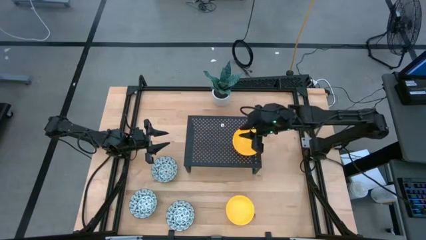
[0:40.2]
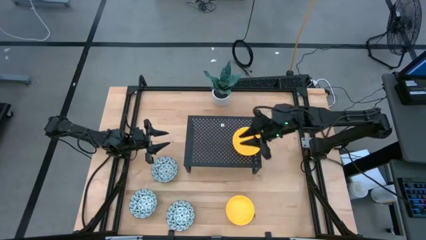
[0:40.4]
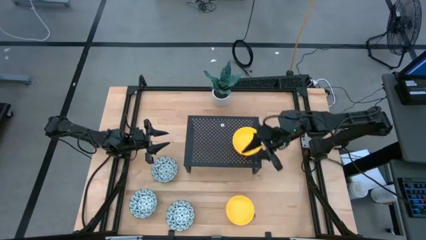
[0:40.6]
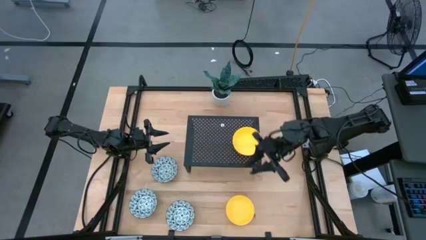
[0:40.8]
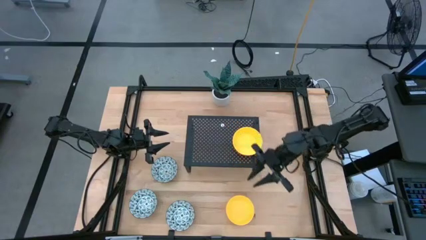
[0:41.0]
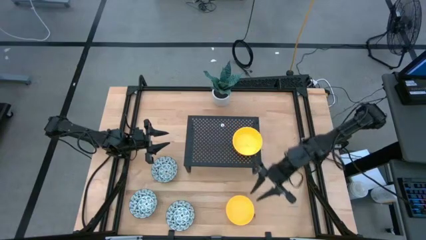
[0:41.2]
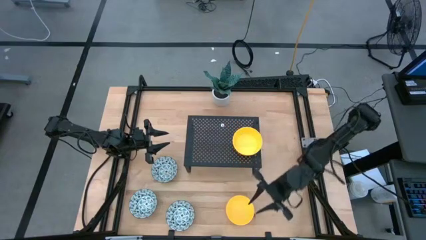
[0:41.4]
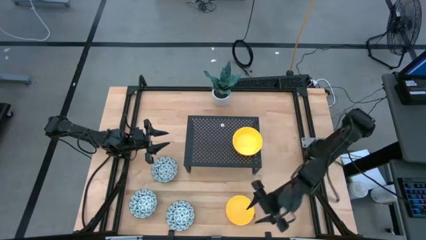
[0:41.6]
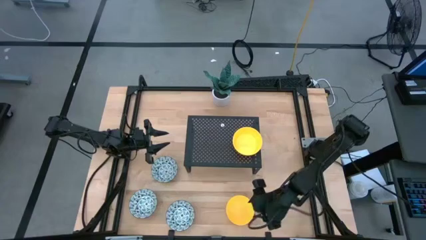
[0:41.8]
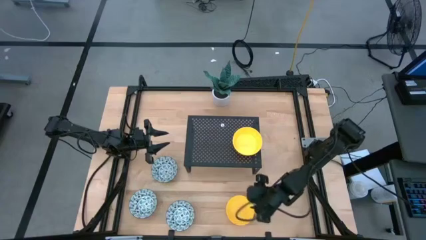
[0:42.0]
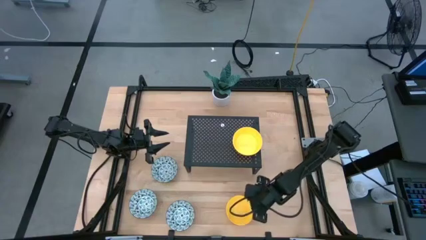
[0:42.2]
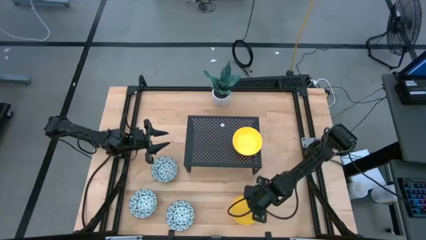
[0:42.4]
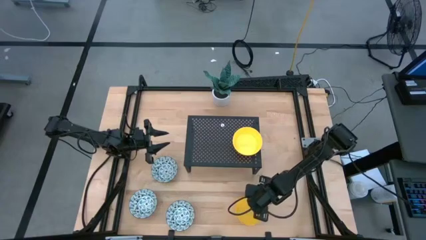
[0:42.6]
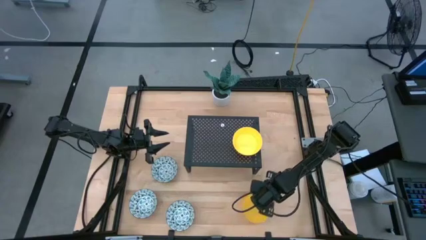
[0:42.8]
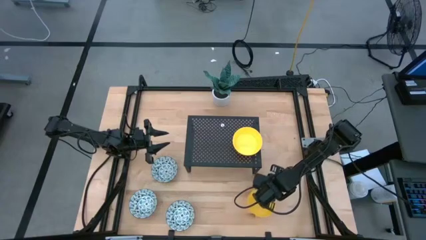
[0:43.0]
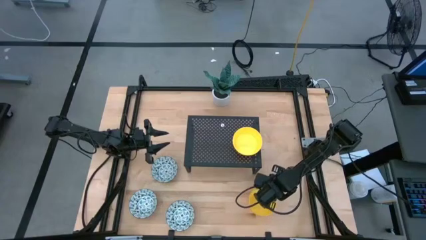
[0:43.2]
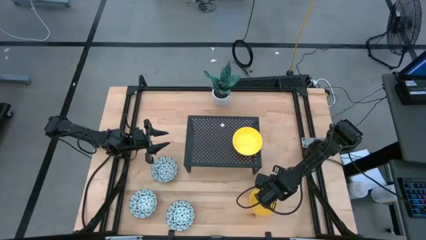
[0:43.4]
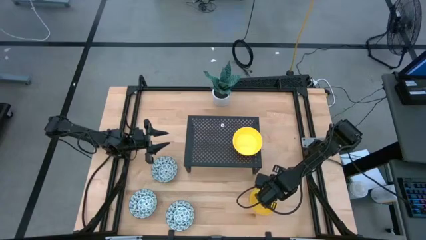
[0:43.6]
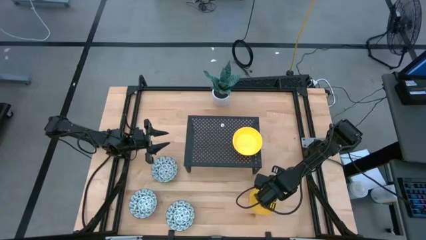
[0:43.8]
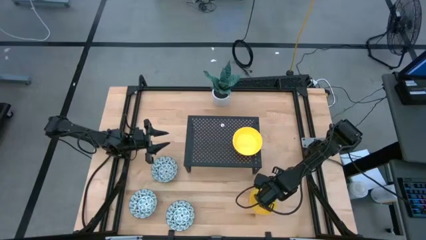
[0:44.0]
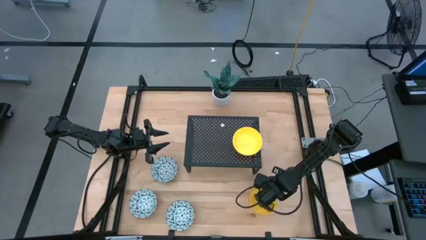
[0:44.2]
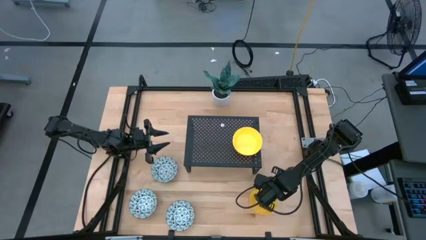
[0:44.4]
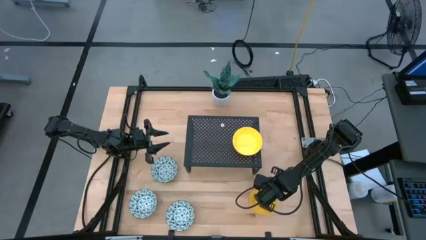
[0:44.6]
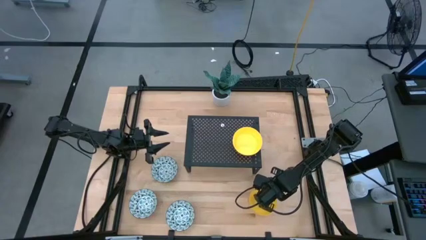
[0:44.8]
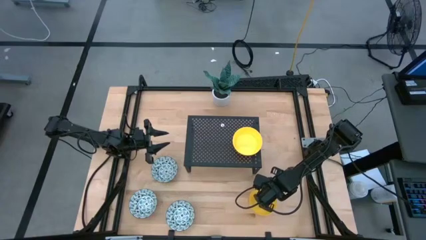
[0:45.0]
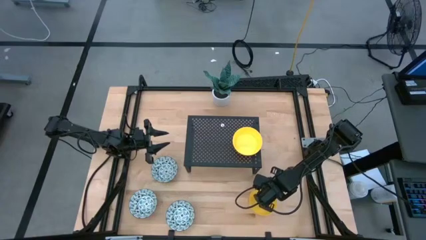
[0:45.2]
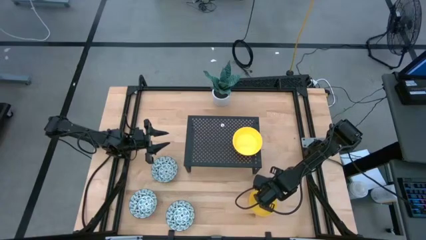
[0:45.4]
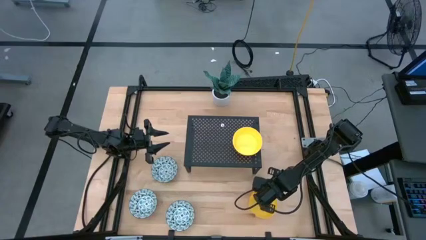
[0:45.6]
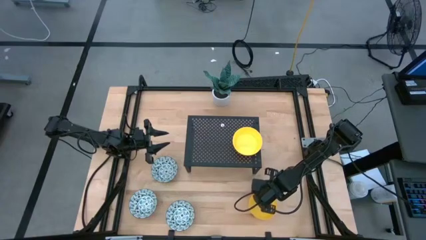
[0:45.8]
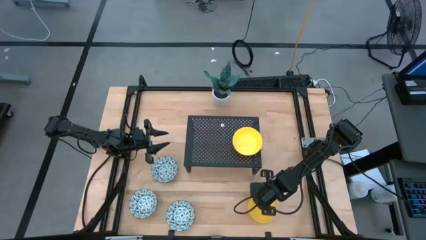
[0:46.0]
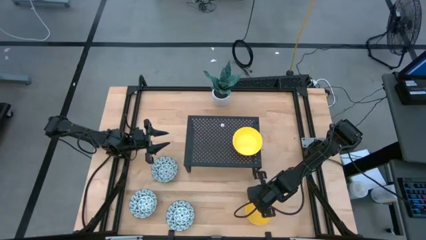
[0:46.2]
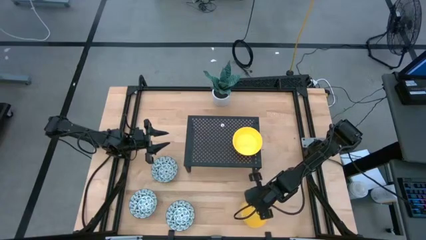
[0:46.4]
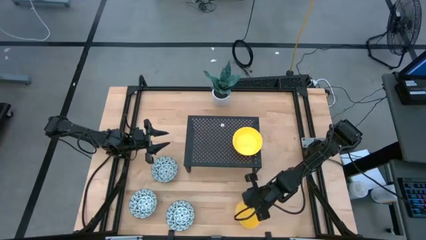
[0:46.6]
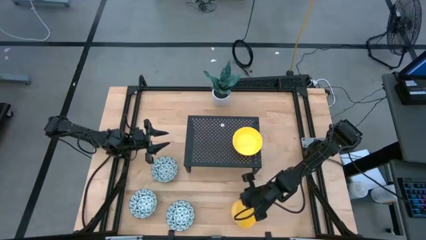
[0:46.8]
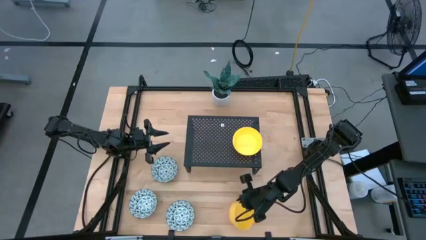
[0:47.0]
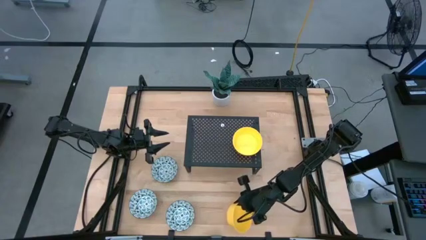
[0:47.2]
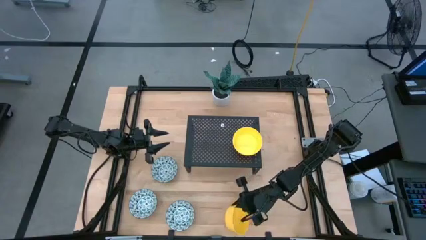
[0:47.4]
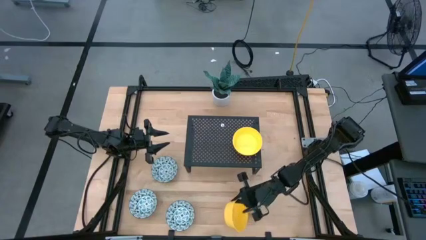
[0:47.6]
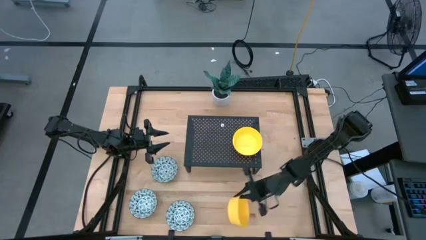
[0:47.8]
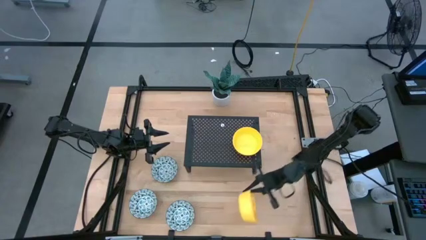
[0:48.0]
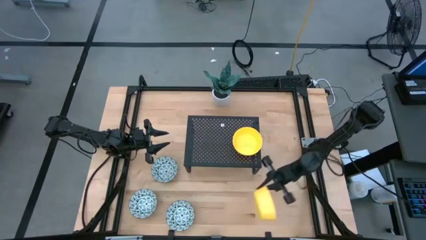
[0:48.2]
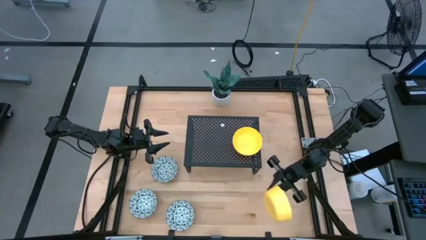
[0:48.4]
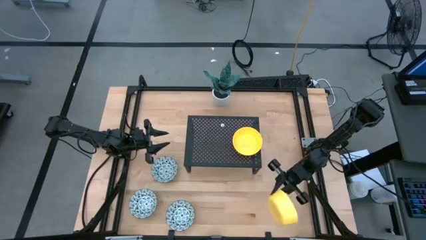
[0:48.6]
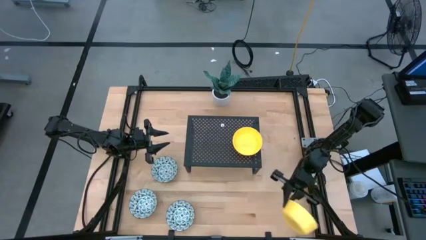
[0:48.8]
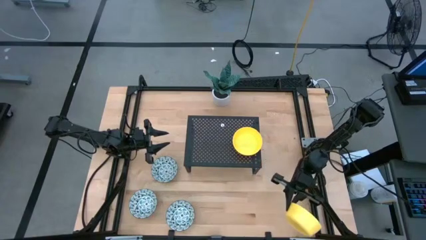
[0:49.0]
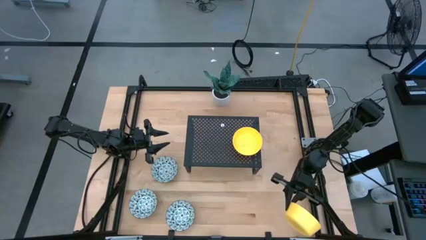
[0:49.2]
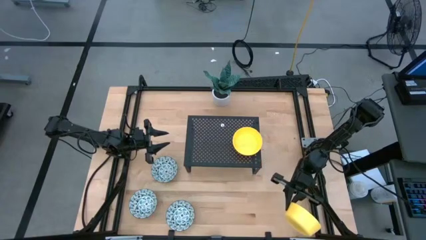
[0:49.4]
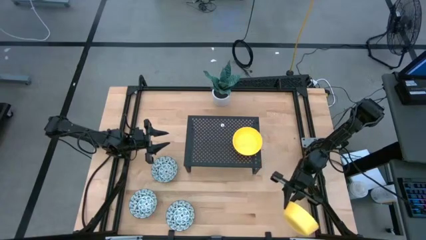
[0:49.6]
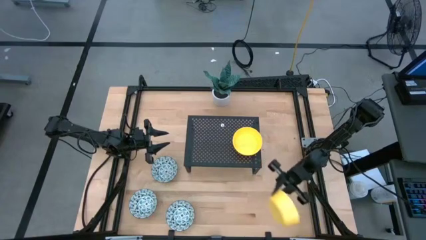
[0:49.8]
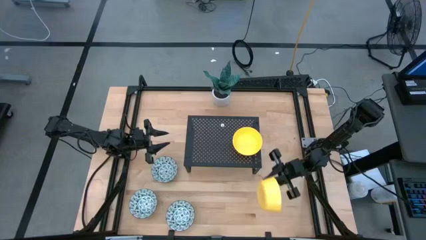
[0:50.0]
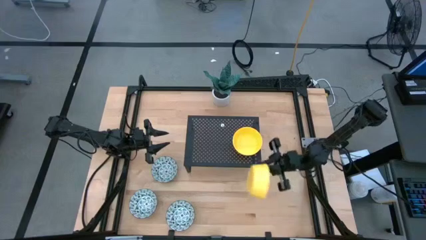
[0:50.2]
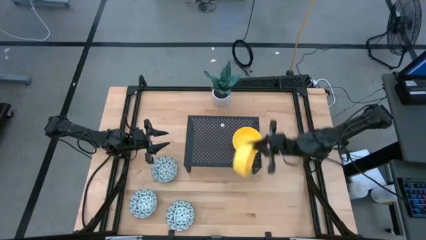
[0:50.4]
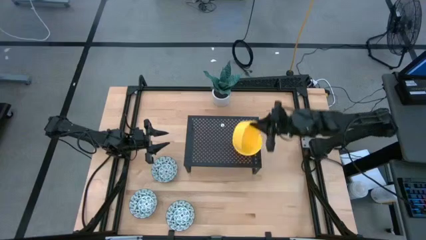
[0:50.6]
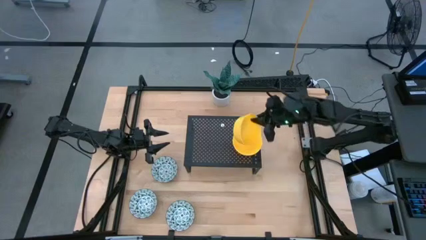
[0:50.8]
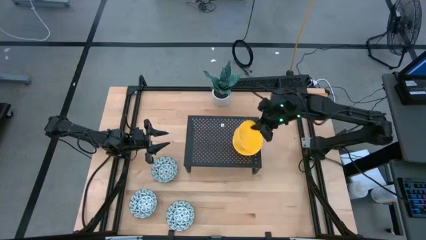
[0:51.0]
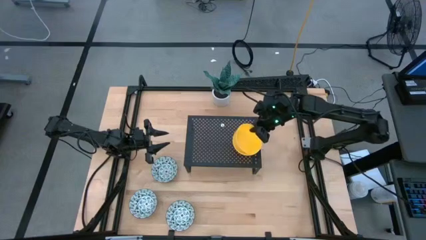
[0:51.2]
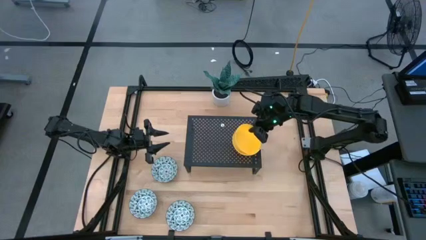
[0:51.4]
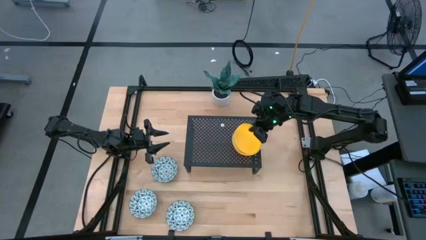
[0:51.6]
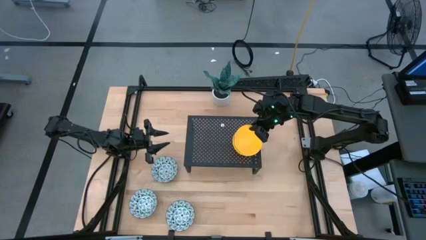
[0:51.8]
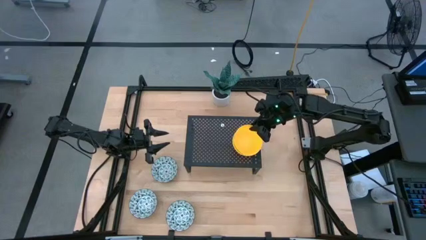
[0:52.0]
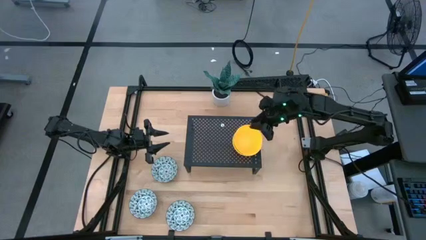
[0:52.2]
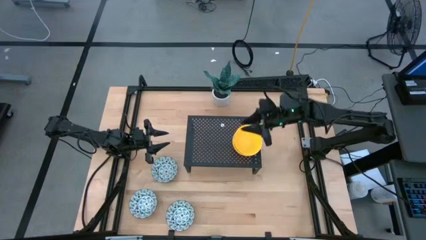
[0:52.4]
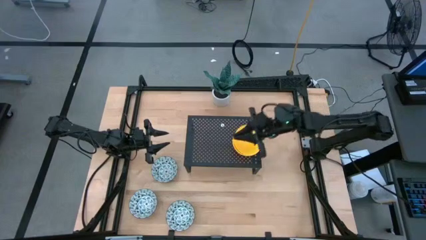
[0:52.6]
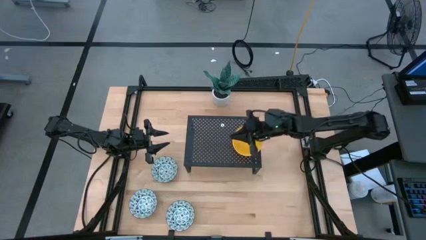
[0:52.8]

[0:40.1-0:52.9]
Task: Pick & Place Mini bowls
Stack the yellow bowl on the yellow bowls on the shelf

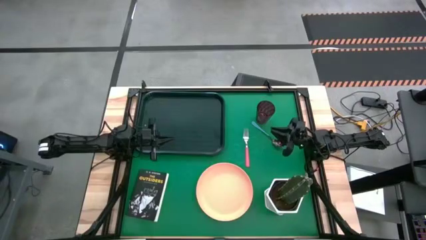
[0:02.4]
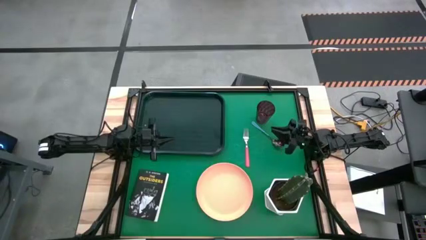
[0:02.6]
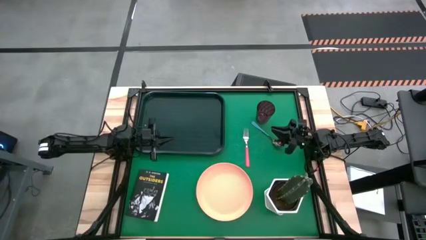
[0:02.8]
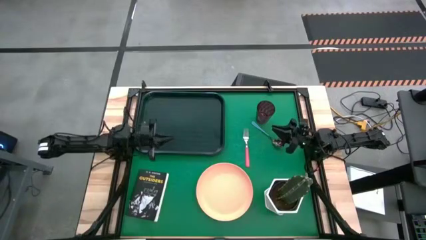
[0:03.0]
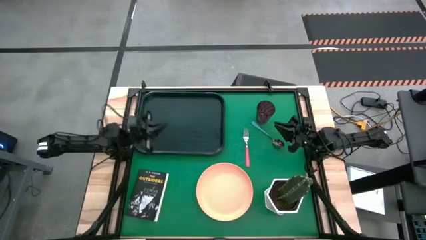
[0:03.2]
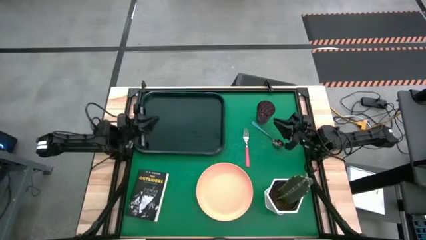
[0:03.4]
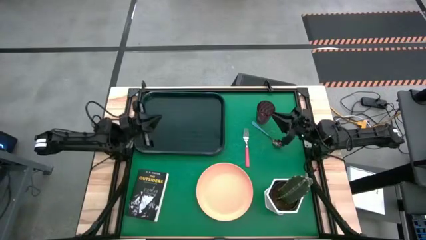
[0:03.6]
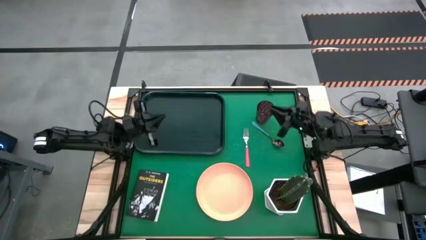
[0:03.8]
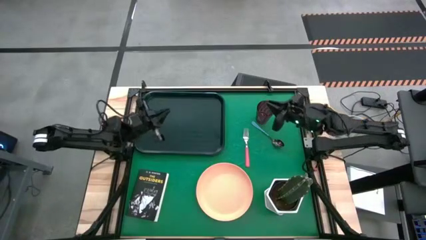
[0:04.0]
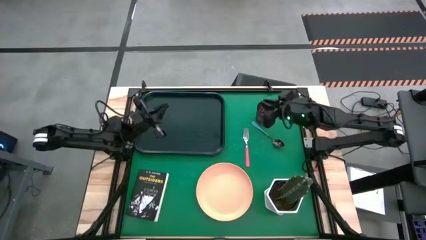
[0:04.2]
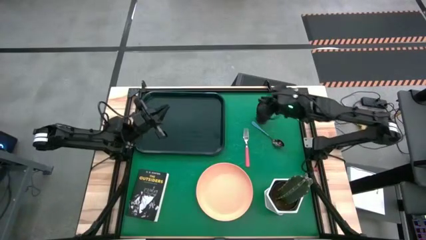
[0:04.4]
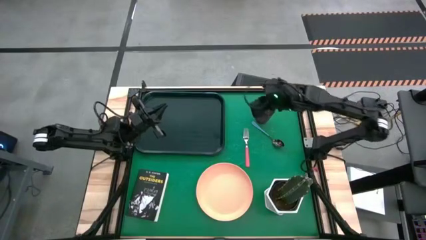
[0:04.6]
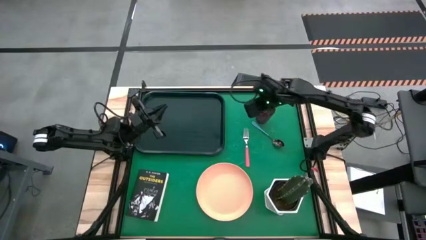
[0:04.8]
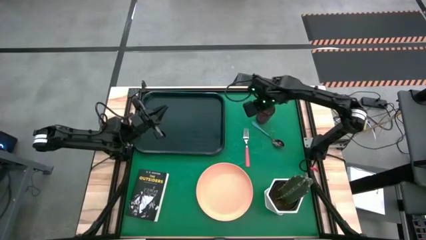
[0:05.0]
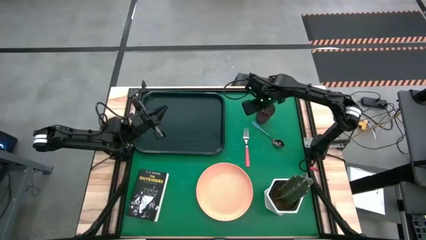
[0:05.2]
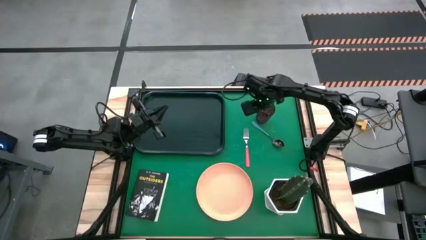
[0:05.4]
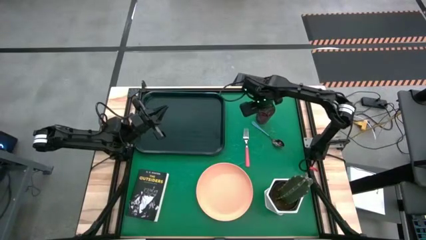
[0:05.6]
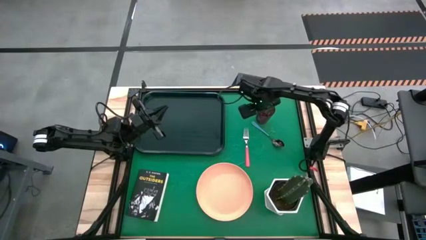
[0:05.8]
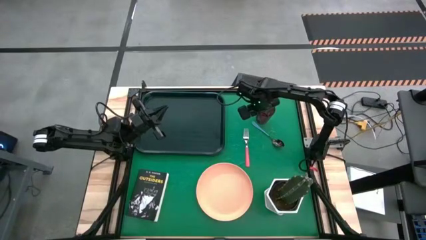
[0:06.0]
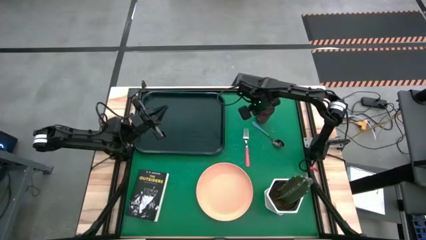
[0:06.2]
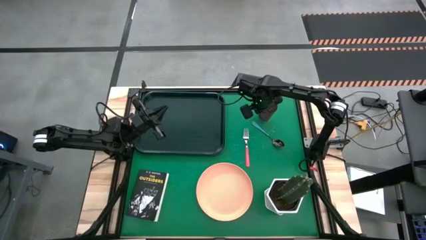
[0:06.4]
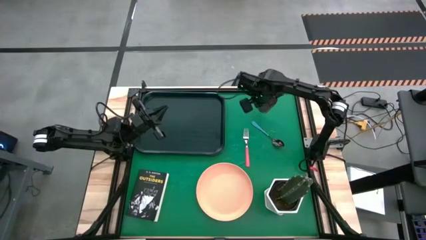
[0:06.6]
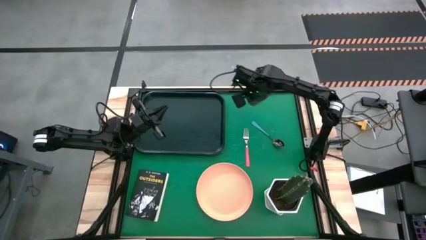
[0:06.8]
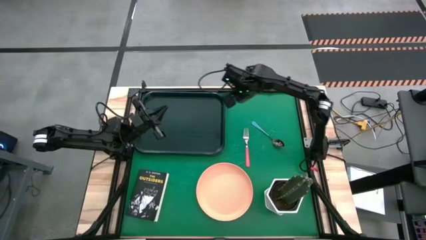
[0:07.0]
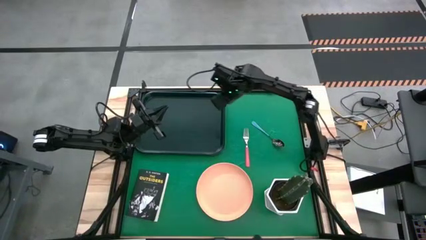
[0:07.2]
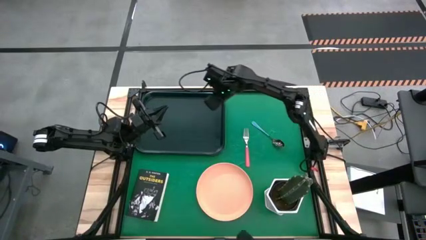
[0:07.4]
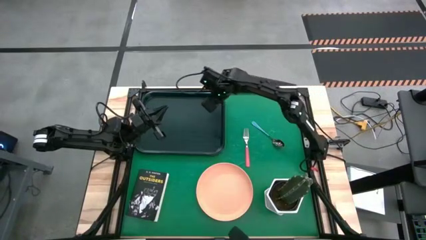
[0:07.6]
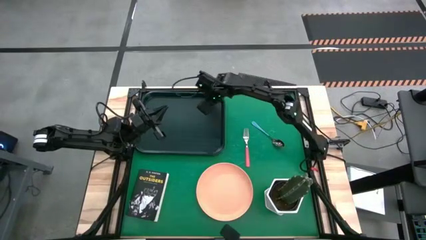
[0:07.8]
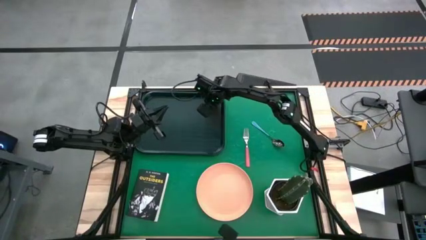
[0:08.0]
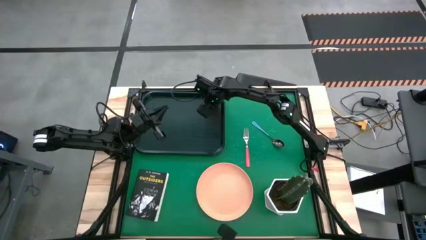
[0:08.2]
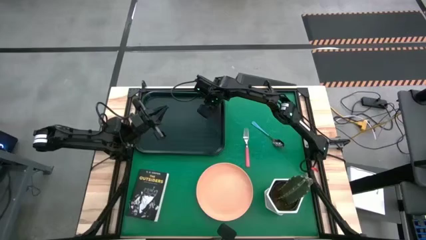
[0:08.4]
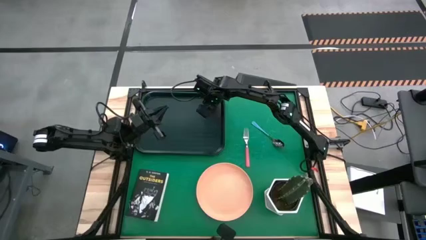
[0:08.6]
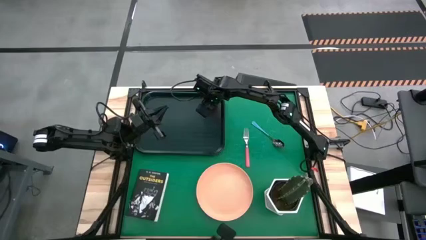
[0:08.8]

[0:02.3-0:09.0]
Task: Pick and place plate/cup/fork/spoon on tray
Put the red glass cup on the top right of the black serving tray
